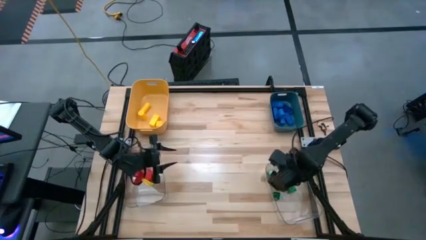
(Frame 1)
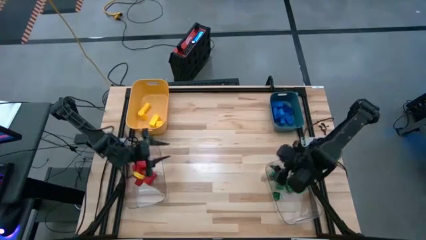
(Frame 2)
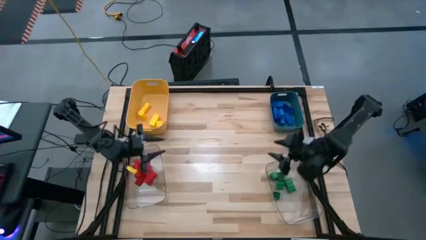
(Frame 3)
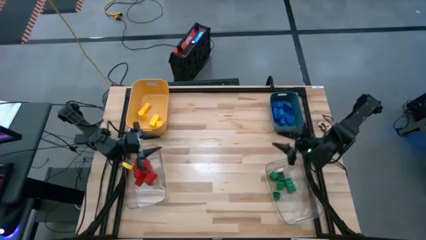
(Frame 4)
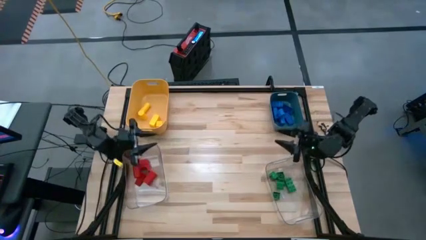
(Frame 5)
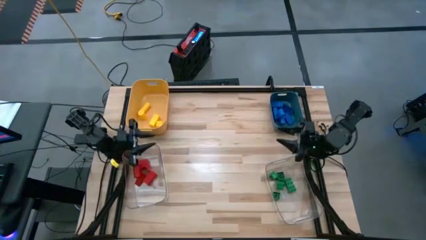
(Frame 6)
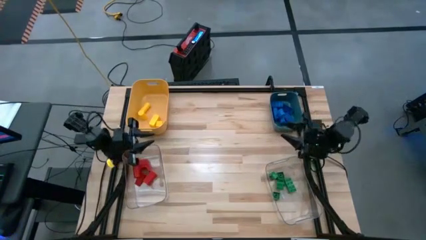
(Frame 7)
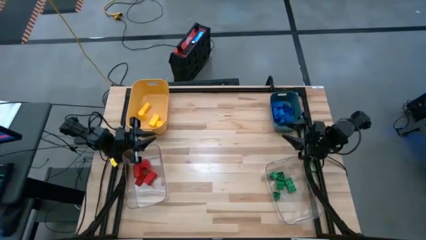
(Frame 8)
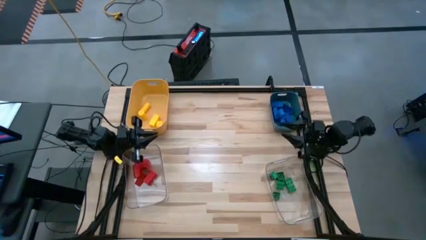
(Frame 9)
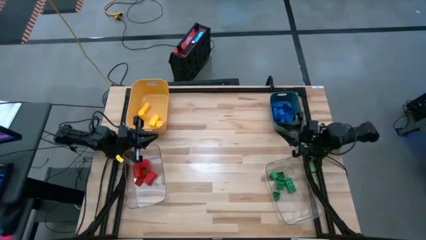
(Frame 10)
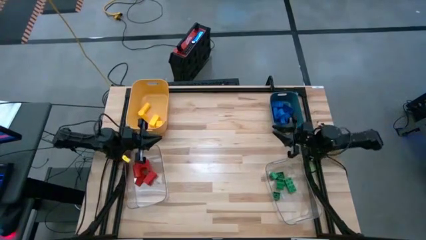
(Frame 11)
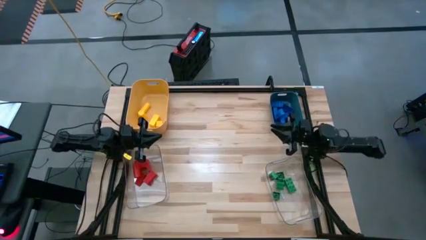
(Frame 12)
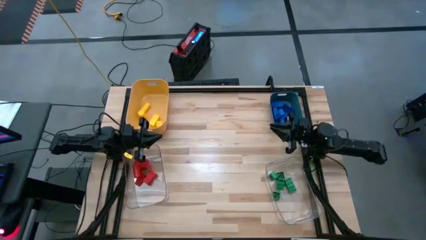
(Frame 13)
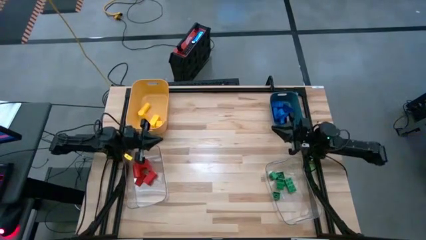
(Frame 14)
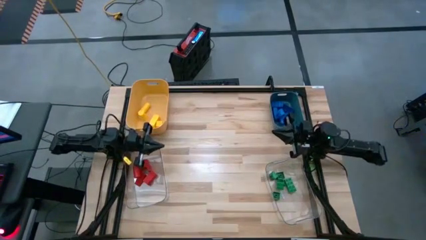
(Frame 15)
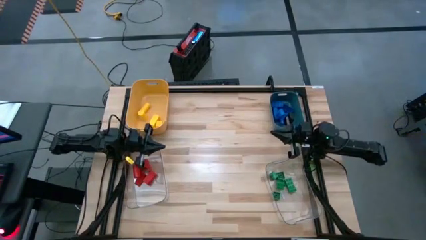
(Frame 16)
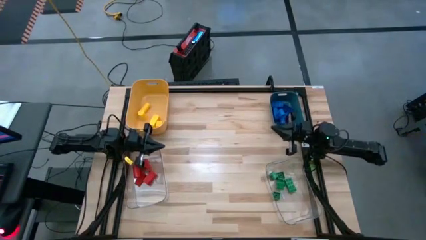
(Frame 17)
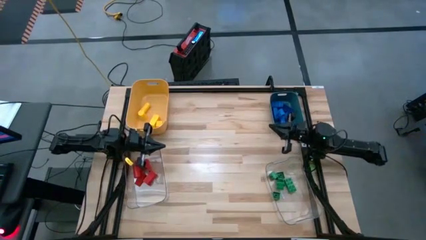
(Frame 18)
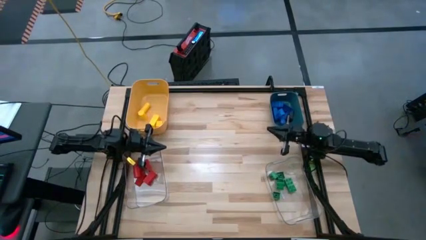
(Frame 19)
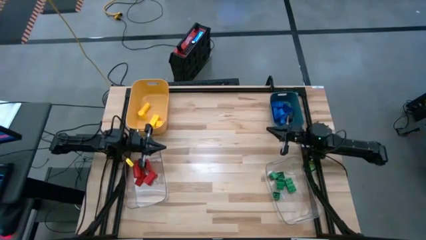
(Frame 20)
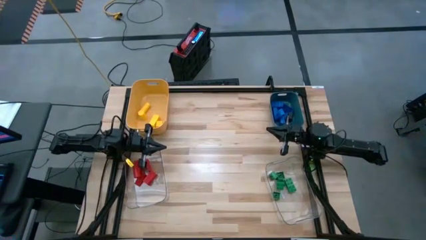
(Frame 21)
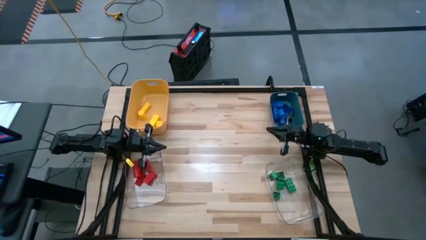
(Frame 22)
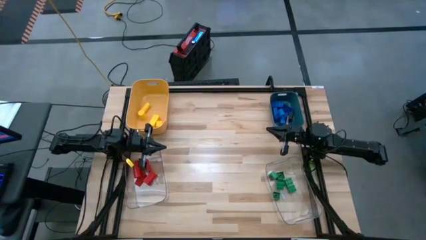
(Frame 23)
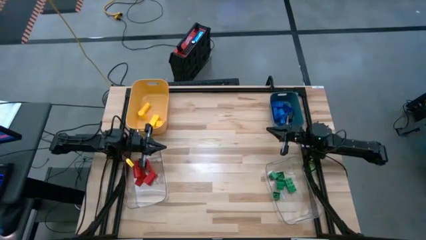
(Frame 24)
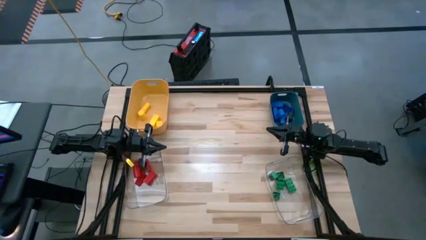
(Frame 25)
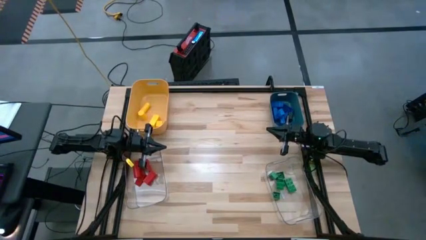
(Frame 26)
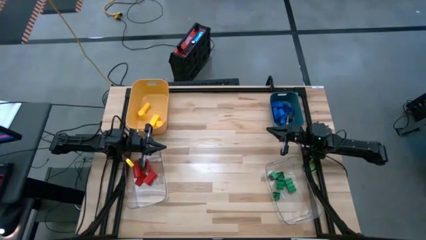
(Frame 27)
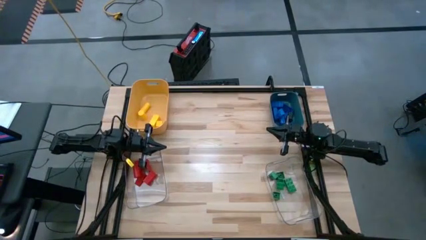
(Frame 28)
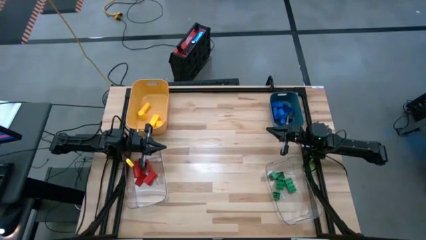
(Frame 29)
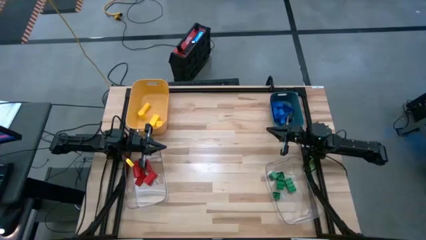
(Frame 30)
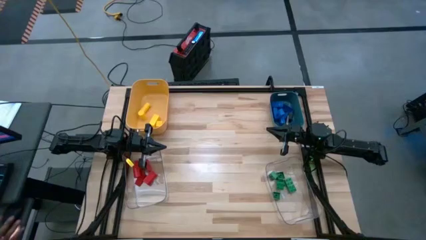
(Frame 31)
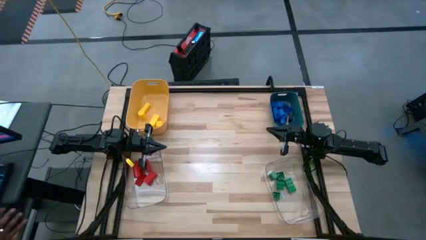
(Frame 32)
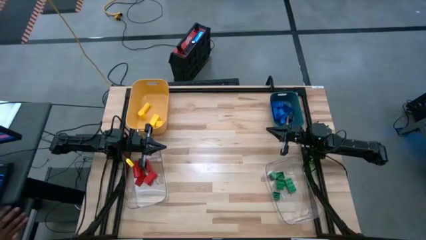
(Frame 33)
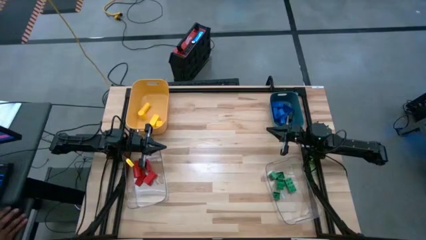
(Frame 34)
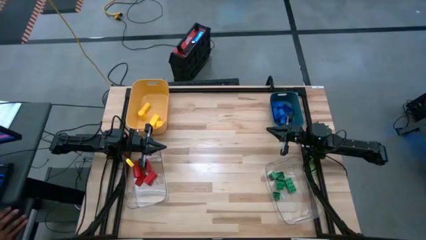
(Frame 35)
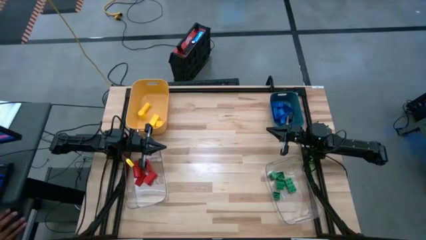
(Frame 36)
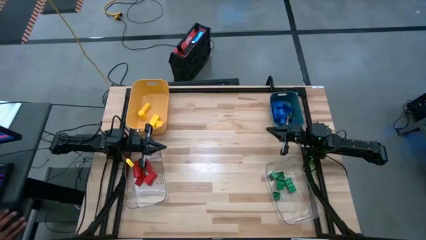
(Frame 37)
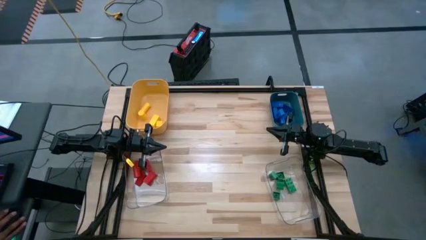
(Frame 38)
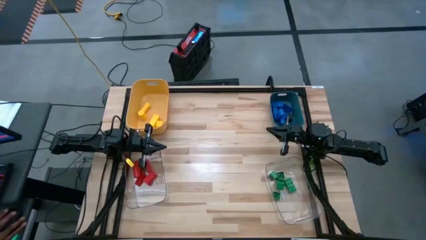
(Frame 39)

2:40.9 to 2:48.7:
Task: Sort blocks
Return to Home Position

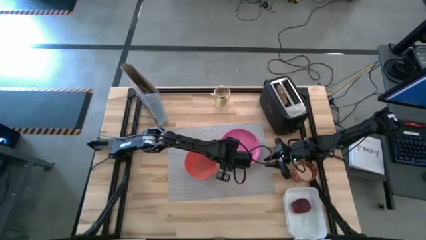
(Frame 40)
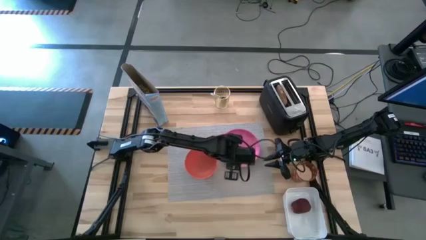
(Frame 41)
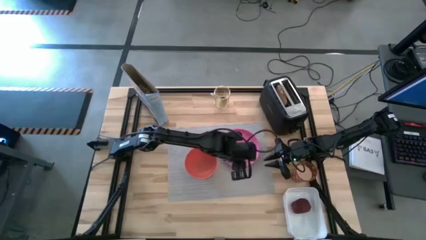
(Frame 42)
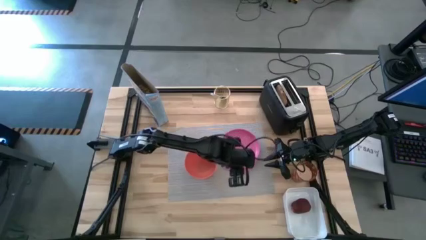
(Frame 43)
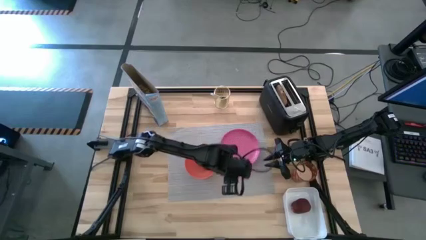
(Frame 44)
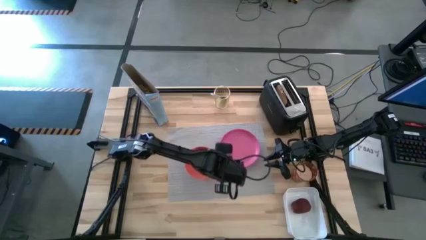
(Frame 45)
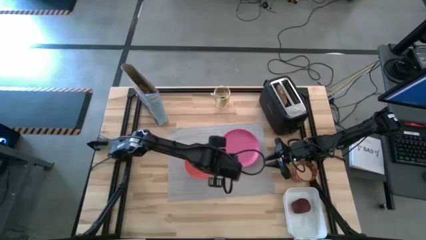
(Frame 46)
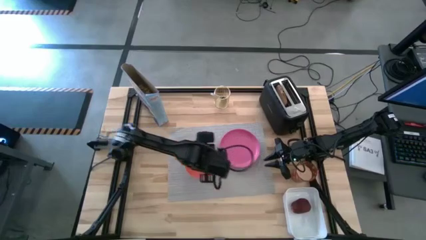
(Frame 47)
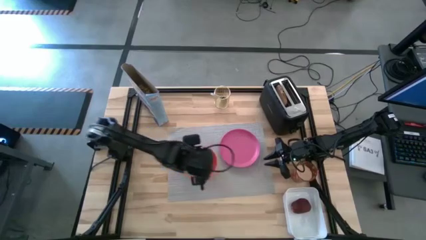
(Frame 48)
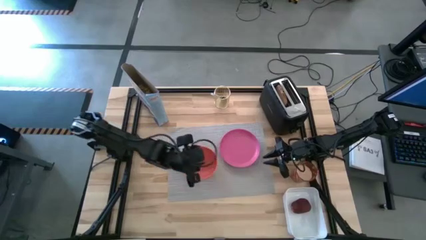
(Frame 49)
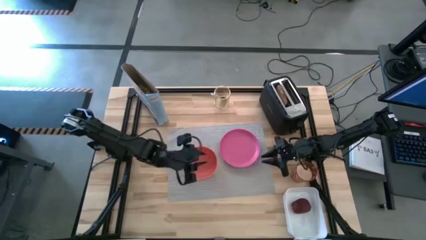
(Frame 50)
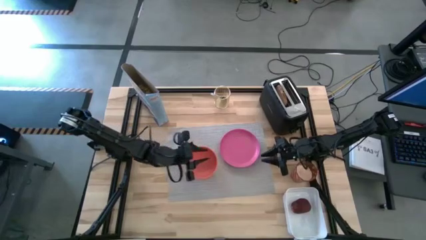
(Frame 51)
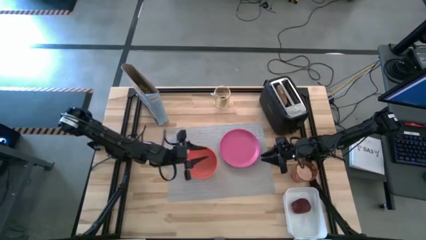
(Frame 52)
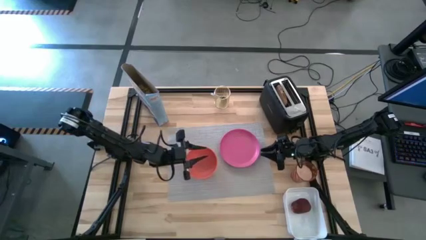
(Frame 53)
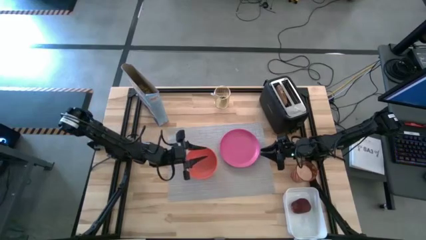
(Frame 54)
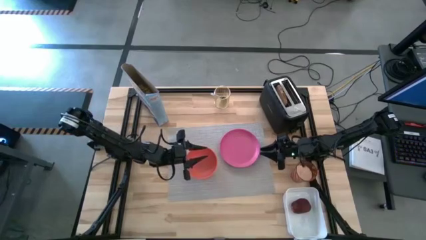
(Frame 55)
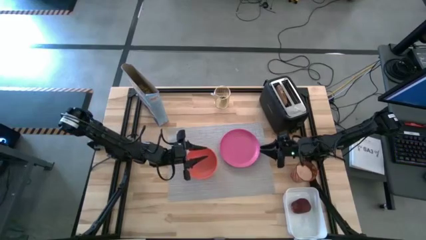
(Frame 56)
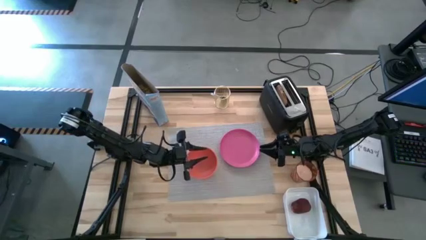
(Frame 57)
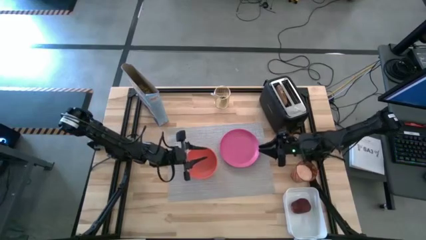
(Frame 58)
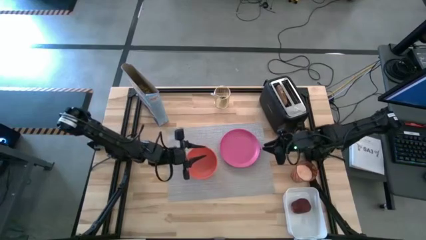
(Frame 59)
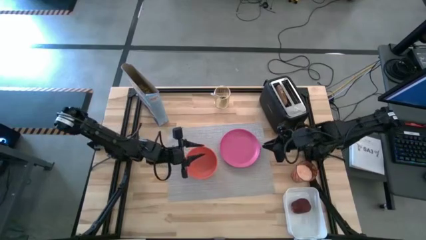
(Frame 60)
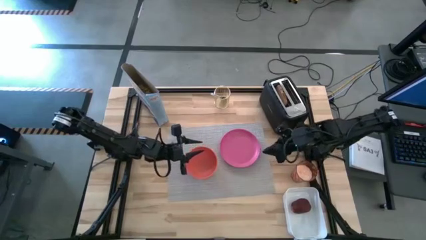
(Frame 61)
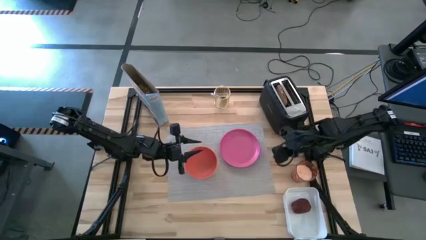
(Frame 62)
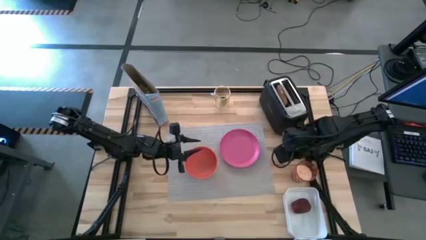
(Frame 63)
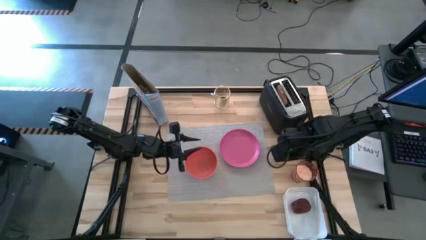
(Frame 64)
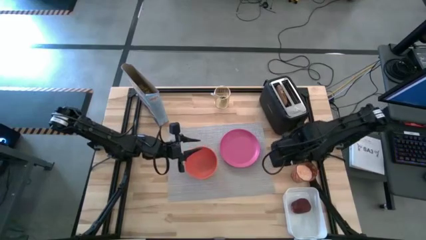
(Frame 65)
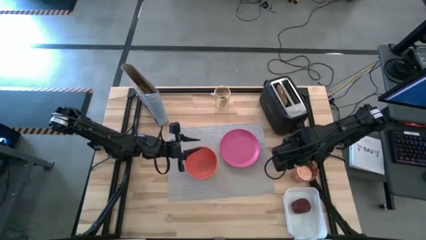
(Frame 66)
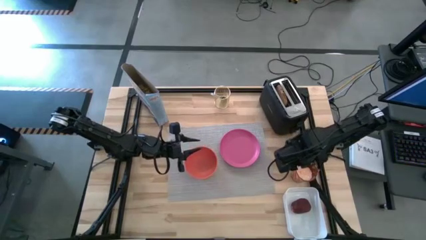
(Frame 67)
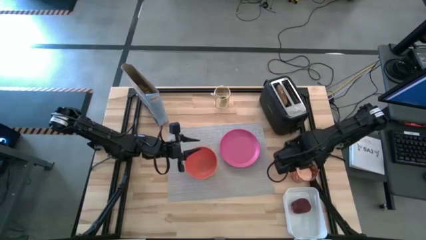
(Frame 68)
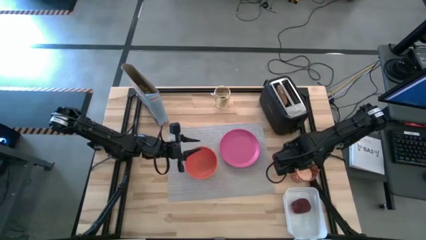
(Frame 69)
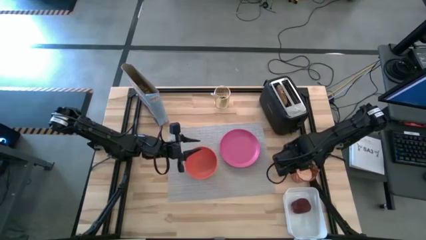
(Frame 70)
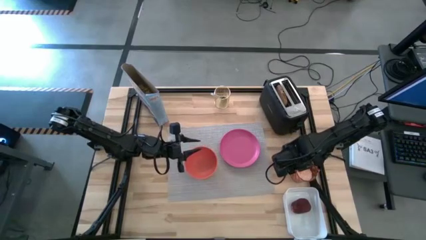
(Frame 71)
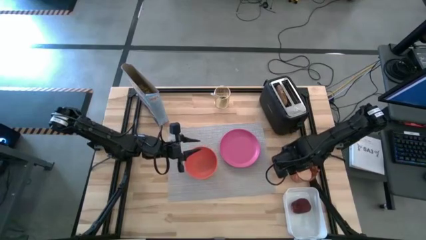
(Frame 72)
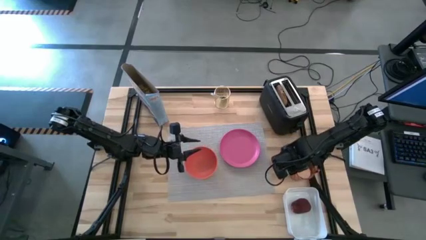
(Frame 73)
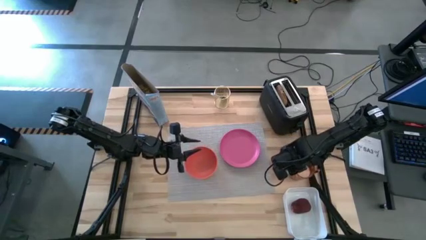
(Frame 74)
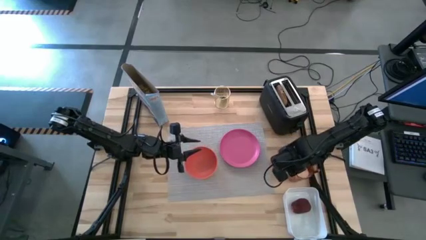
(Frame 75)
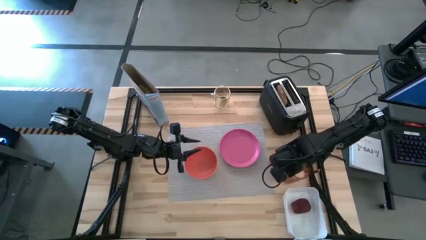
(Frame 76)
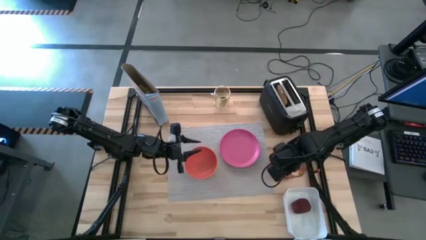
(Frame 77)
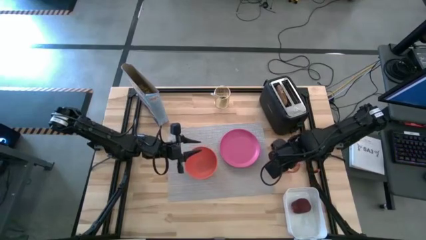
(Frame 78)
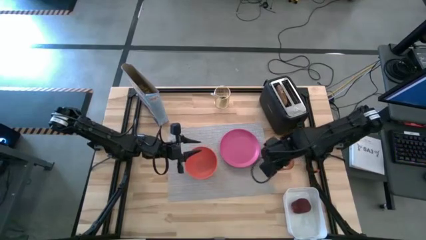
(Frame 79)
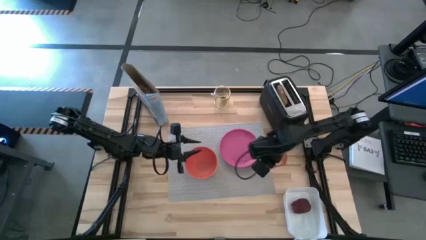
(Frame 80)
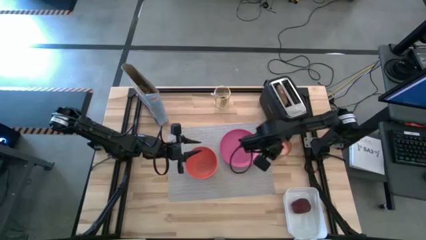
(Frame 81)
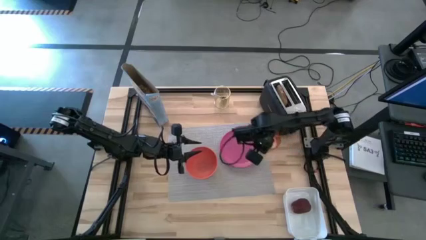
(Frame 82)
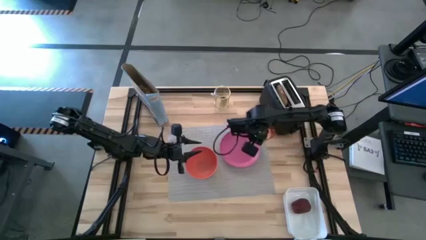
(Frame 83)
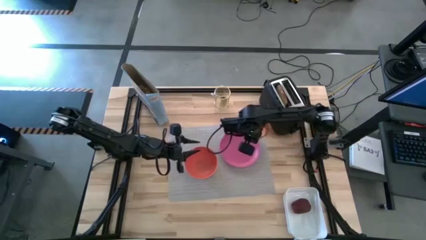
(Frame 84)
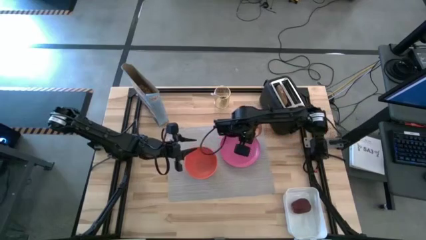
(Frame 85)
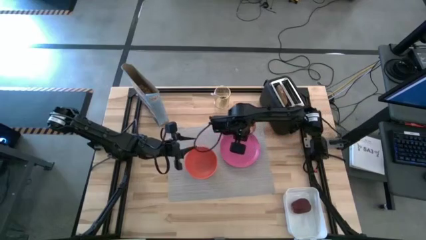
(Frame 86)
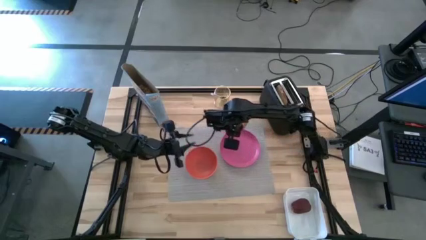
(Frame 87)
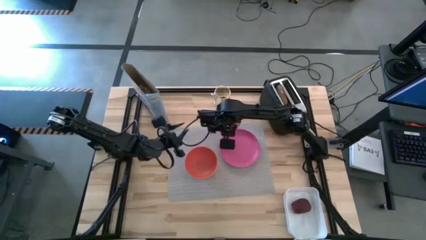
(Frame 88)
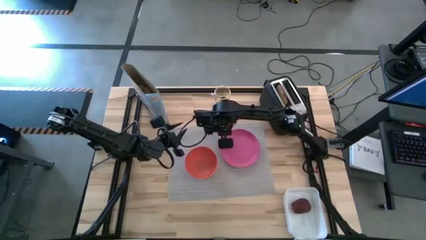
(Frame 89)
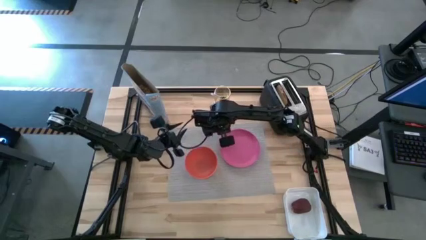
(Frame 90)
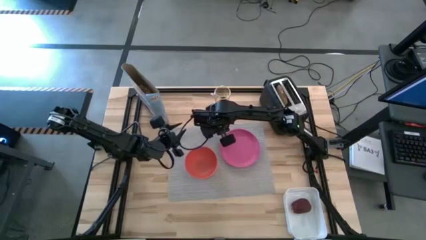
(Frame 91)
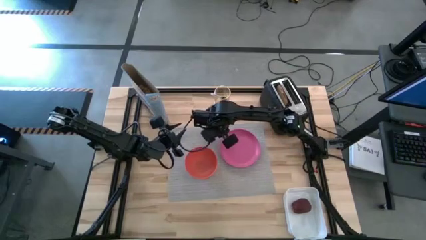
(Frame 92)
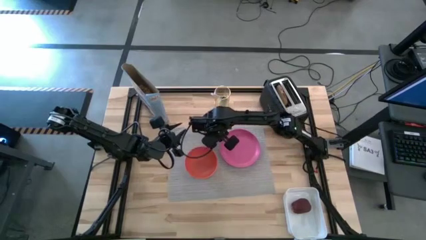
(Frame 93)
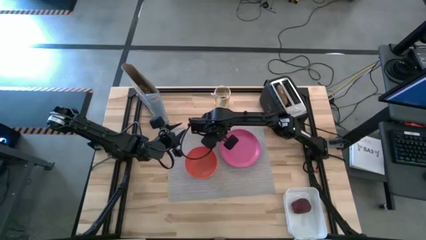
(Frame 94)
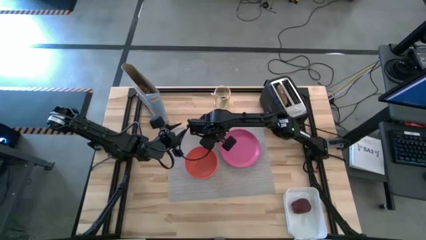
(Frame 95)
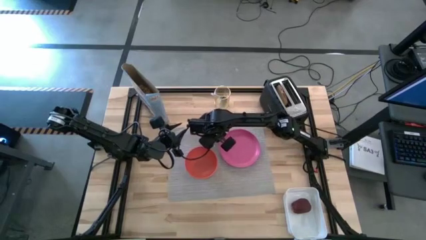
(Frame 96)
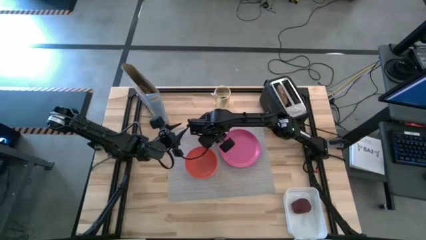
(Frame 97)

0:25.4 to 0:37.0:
Task: Arrange a breakfast setting
Put the orange cup of milk on the gray table mat
